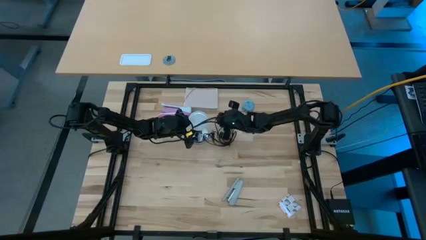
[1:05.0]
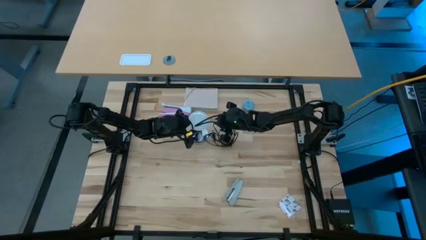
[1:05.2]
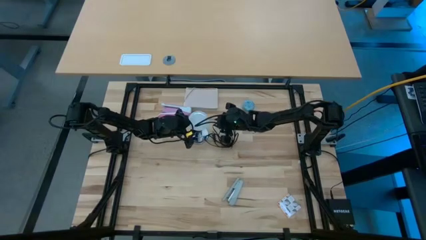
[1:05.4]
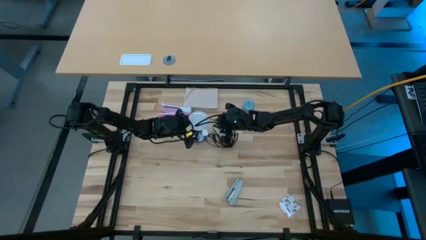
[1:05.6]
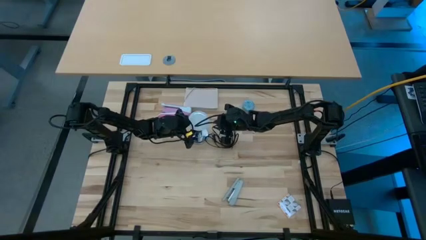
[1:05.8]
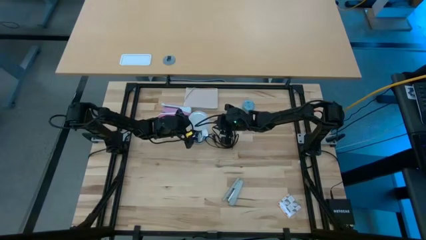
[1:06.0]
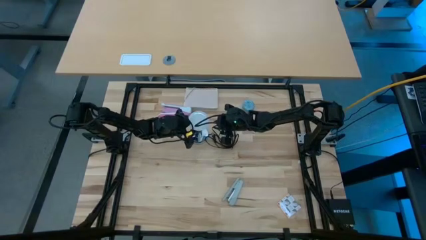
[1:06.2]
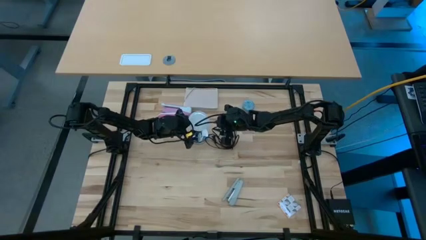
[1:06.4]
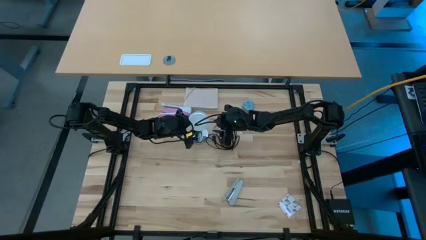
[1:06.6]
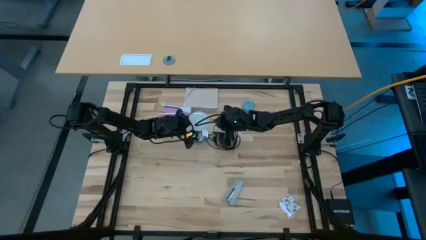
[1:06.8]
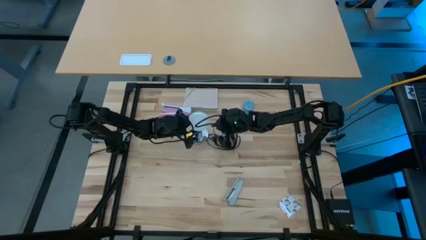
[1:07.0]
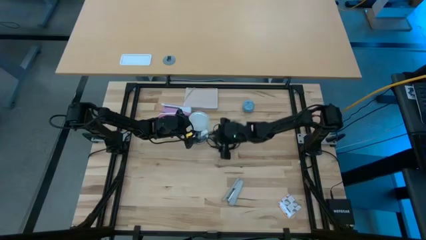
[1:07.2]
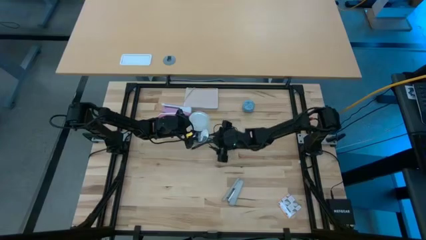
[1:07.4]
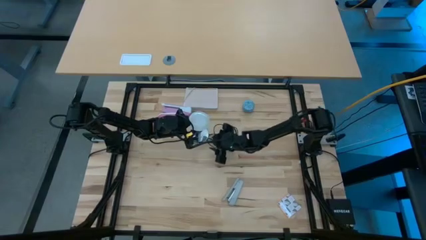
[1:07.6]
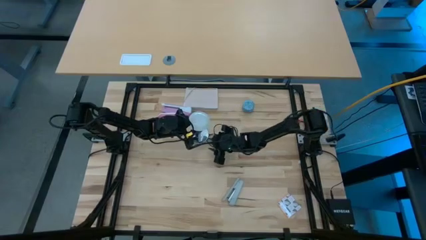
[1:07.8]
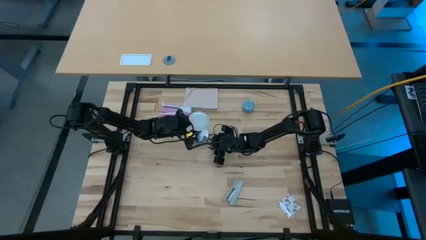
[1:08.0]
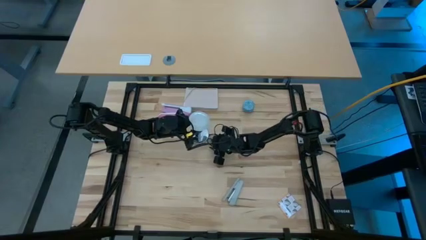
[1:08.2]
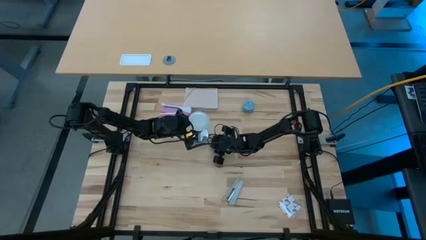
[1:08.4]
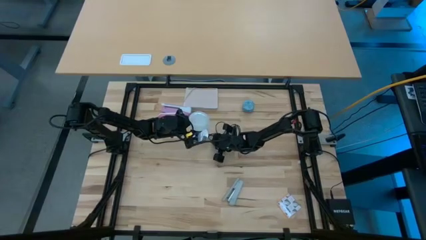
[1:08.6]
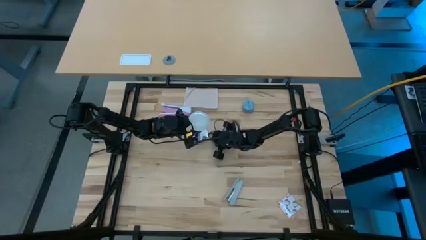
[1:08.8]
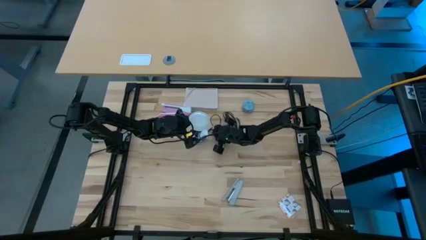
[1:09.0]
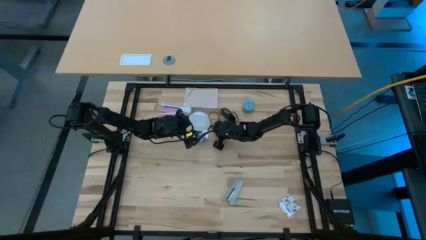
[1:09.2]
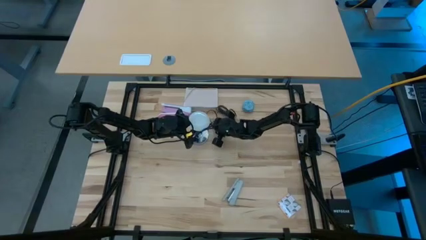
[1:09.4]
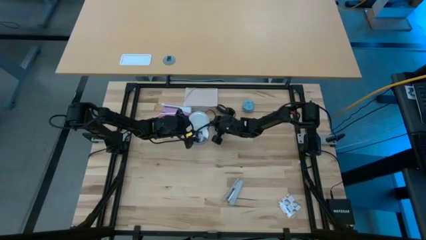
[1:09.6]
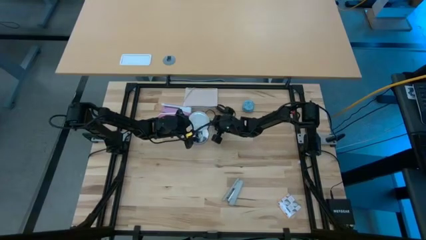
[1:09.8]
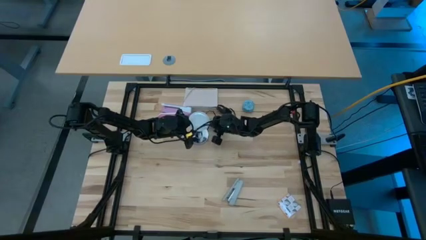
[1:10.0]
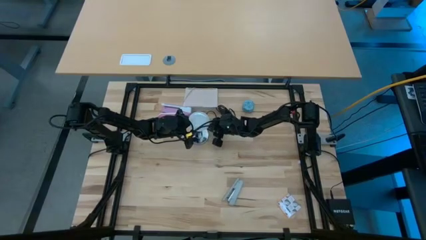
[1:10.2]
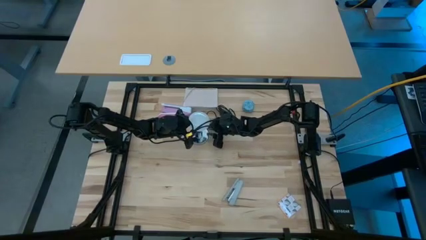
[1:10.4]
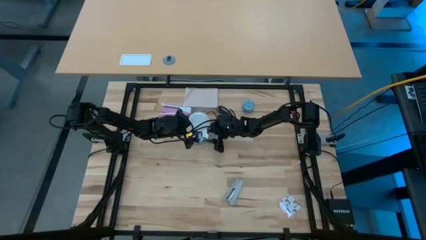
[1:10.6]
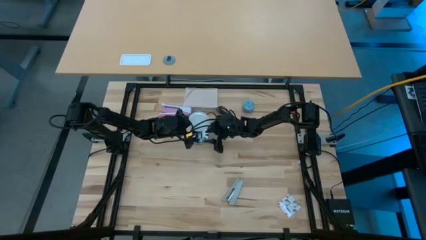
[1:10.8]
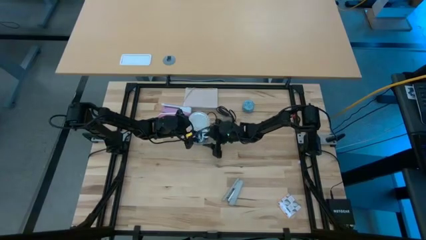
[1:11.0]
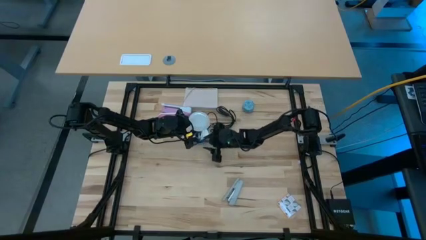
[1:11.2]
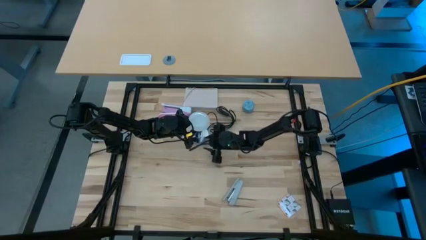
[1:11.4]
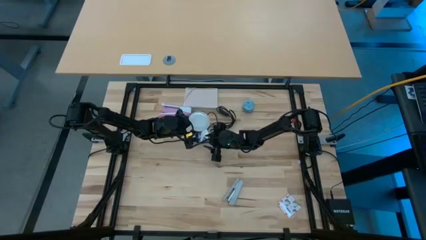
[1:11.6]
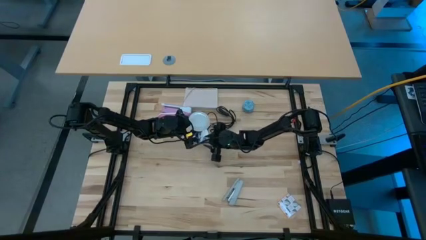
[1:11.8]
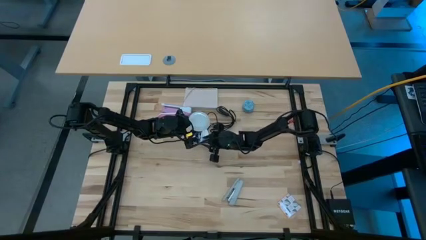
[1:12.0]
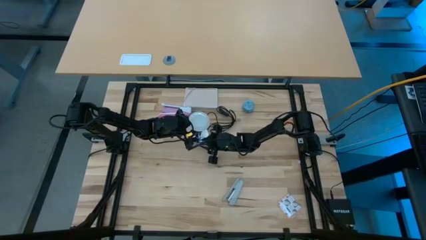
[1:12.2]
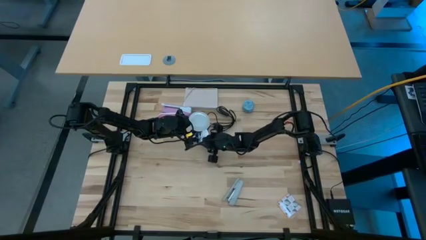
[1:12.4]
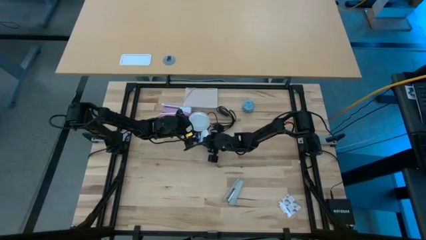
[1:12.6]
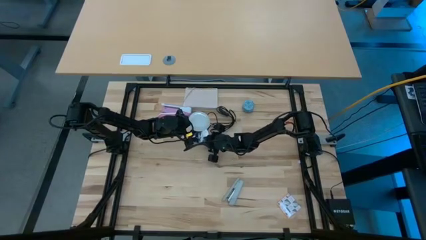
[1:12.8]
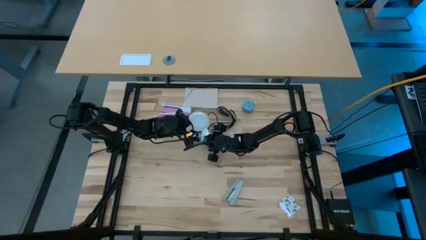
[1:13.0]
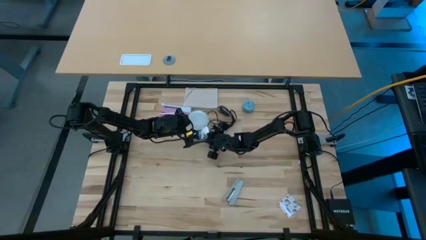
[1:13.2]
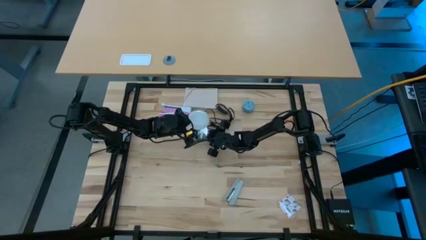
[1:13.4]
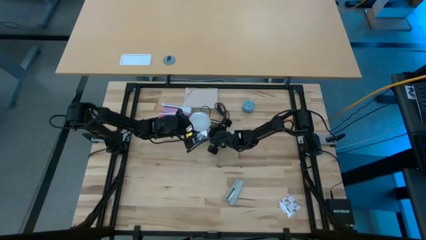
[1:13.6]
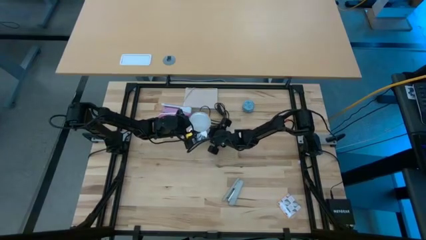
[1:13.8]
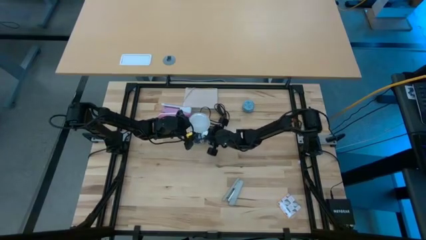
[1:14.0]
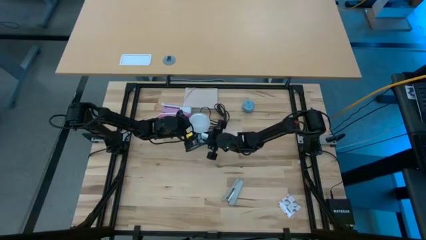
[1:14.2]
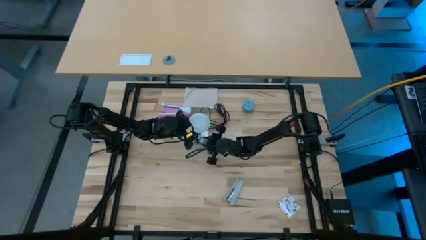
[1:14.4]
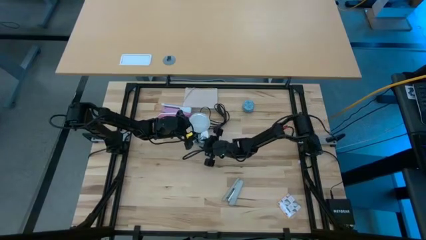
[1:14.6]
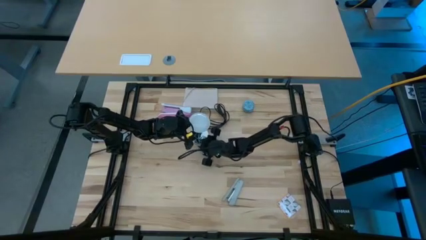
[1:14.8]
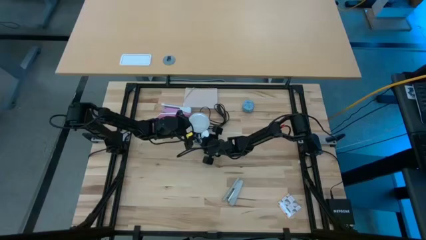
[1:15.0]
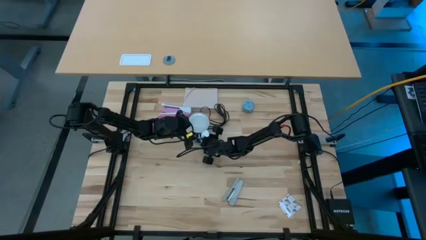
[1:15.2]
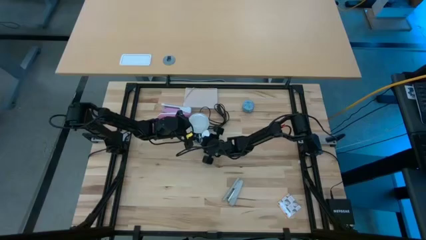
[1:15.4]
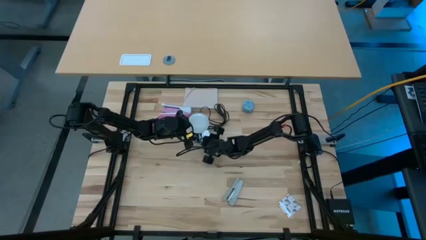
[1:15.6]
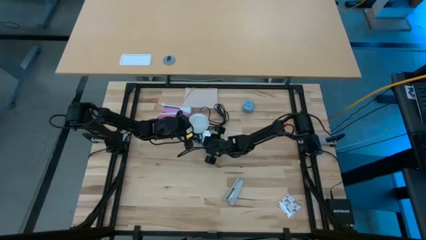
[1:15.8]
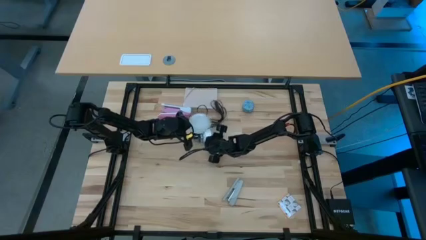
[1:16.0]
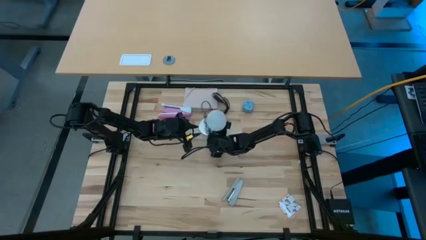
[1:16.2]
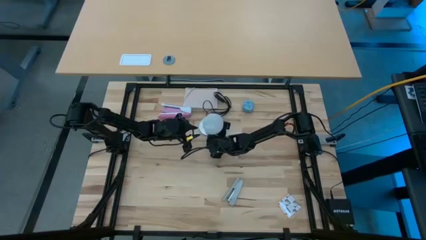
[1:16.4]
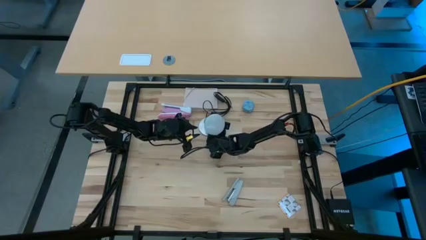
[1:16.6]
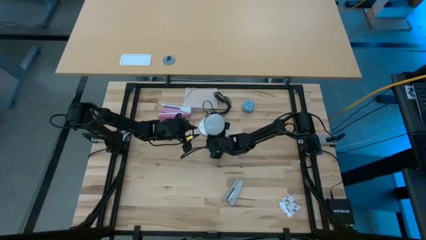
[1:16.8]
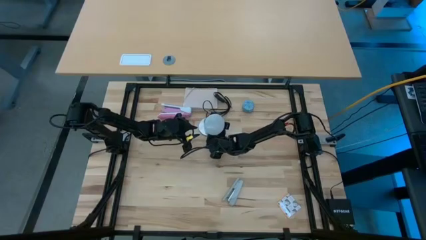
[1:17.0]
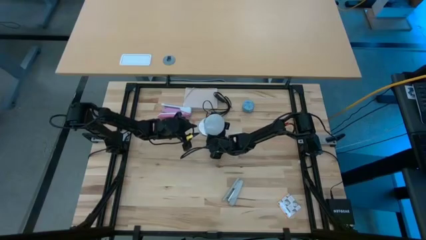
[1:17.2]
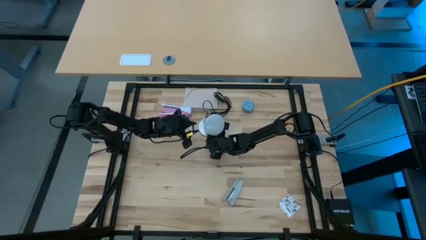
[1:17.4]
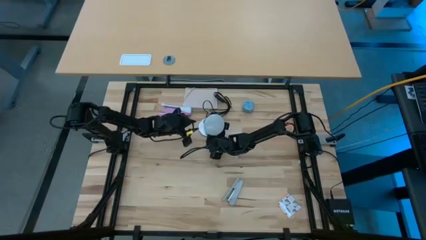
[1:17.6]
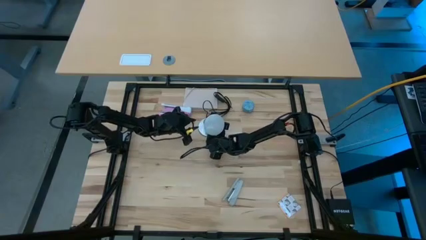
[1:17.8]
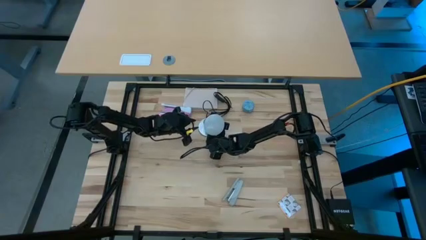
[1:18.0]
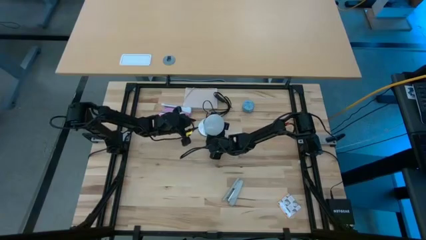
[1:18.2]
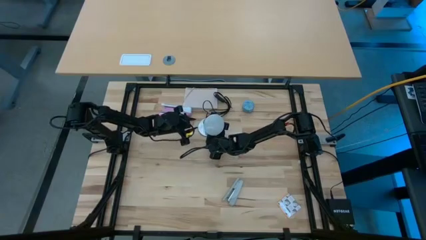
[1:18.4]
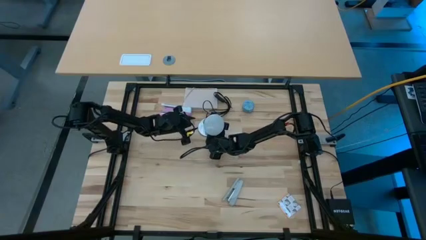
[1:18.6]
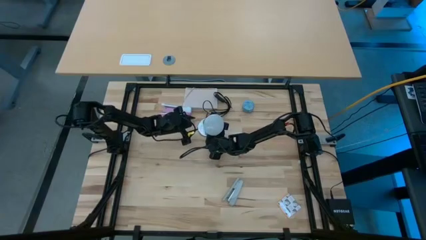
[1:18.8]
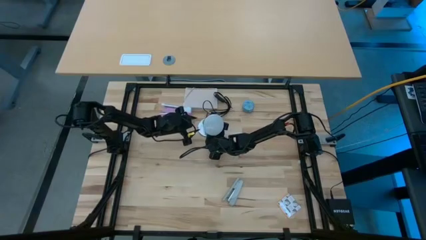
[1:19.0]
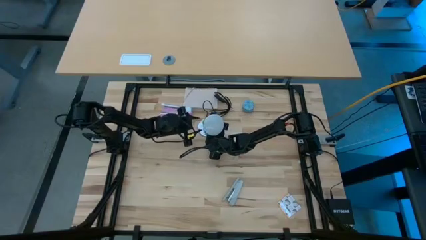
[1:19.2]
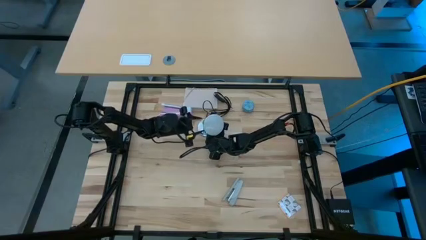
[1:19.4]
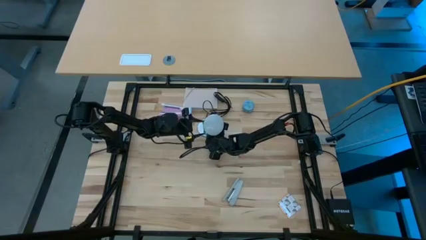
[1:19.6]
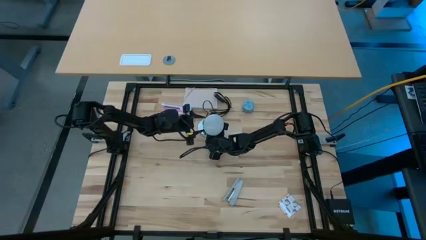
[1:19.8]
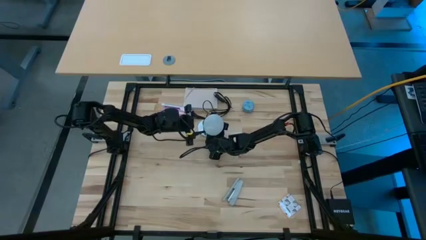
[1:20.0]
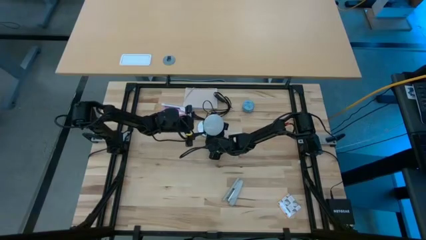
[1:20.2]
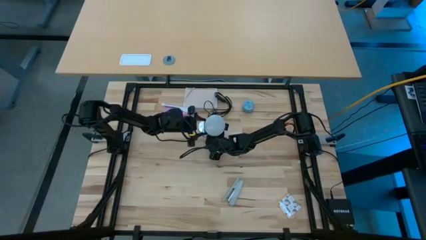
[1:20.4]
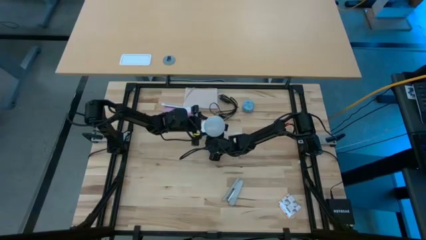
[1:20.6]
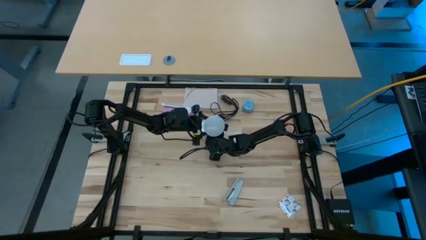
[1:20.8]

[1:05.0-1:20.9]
Task: Screw lightbulb
Insert light bulb into the lamp
